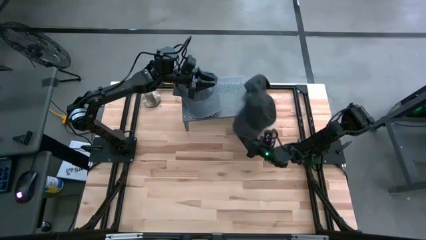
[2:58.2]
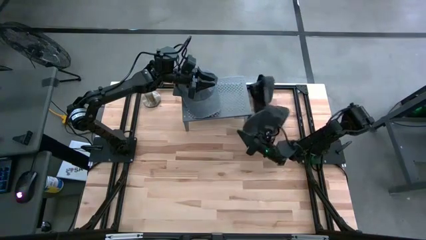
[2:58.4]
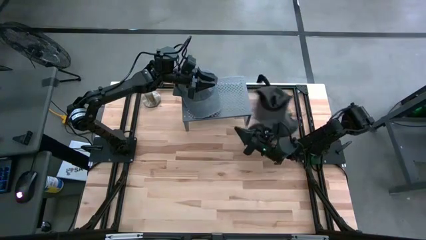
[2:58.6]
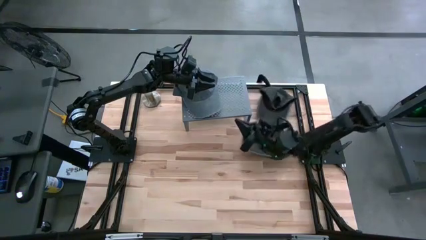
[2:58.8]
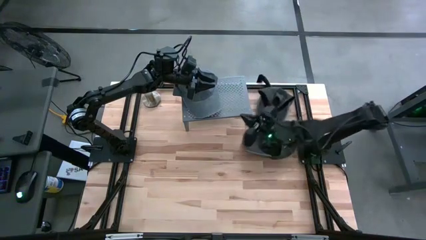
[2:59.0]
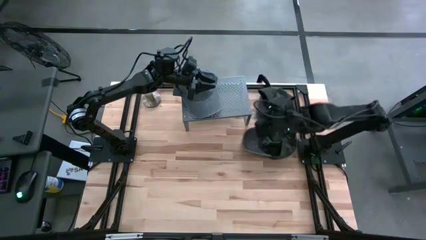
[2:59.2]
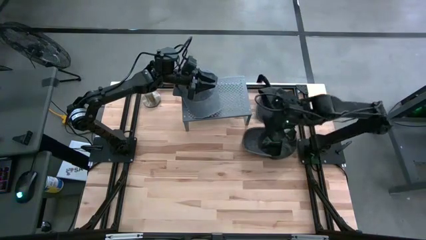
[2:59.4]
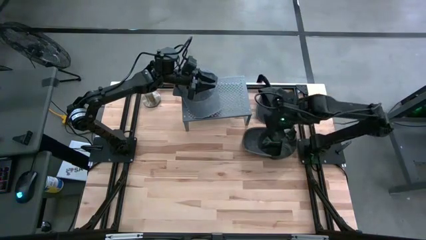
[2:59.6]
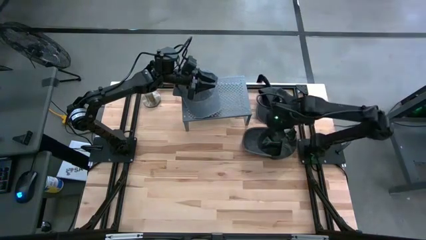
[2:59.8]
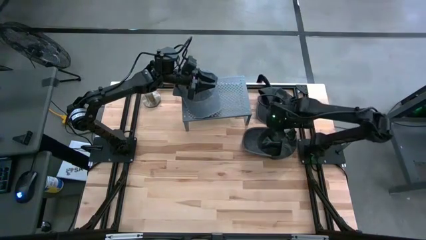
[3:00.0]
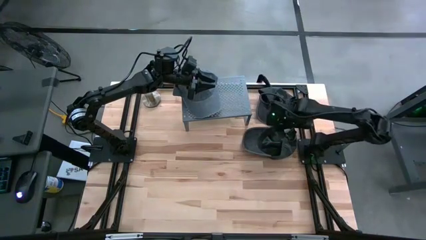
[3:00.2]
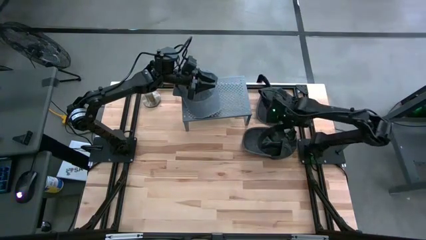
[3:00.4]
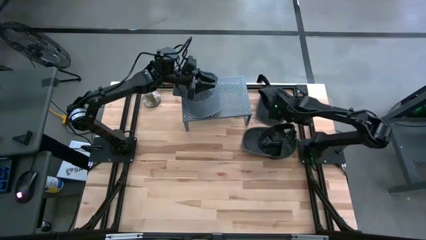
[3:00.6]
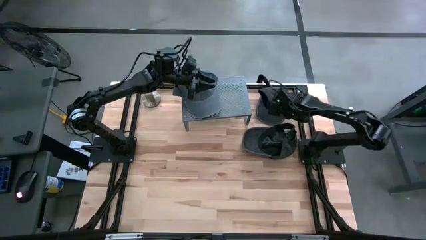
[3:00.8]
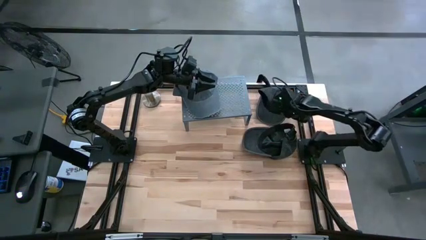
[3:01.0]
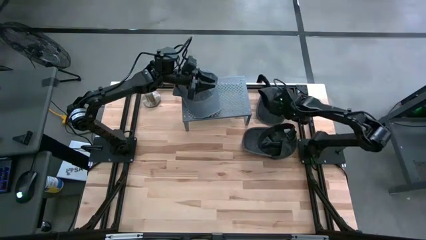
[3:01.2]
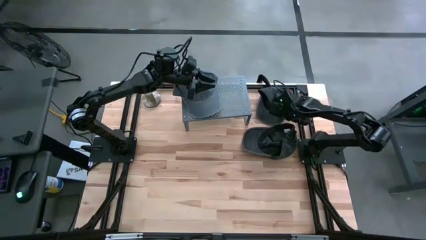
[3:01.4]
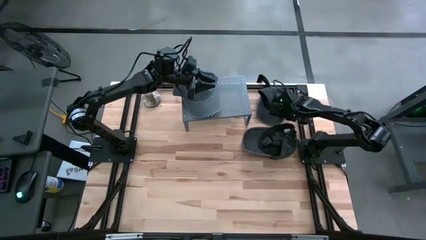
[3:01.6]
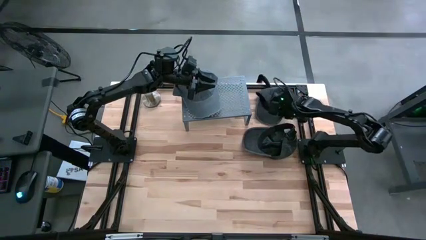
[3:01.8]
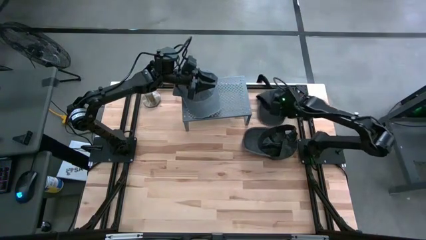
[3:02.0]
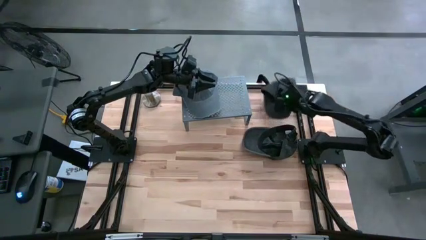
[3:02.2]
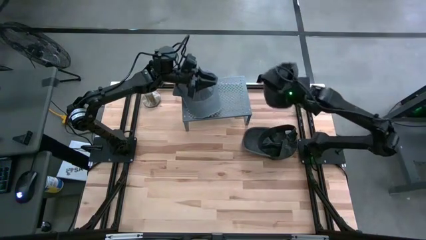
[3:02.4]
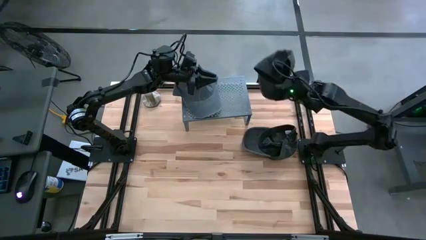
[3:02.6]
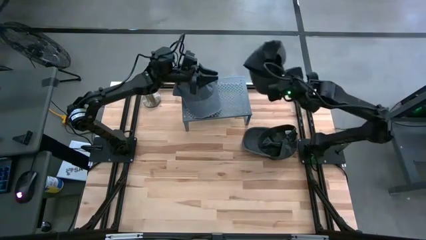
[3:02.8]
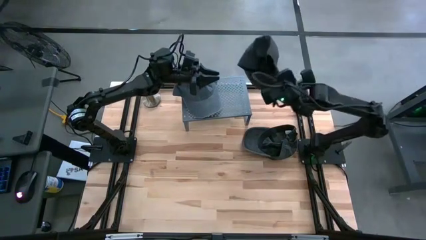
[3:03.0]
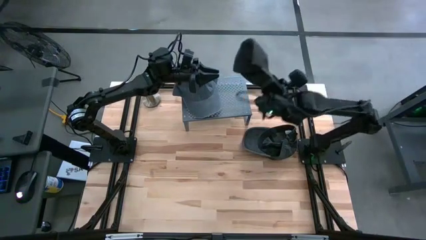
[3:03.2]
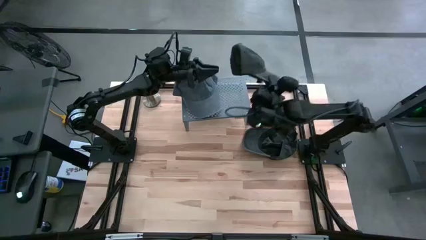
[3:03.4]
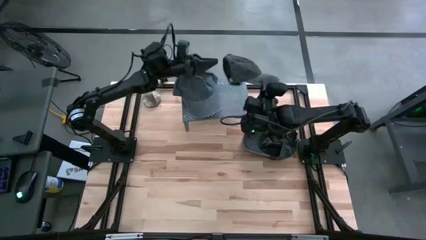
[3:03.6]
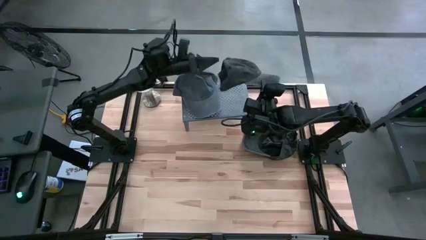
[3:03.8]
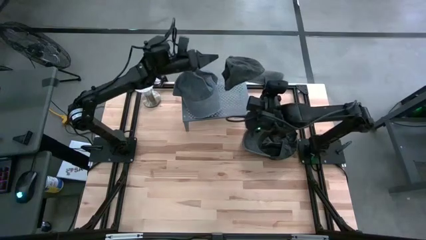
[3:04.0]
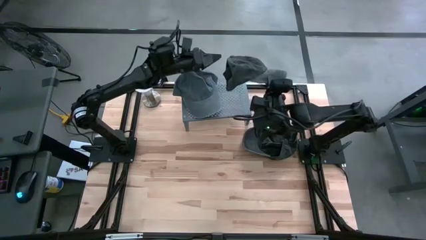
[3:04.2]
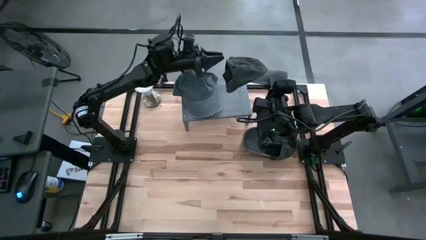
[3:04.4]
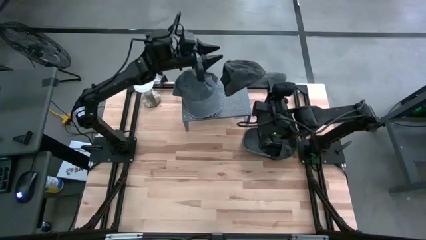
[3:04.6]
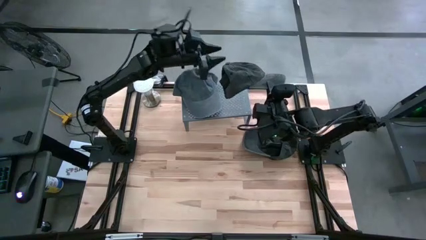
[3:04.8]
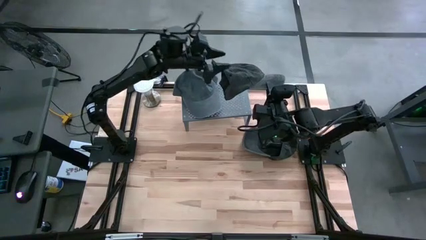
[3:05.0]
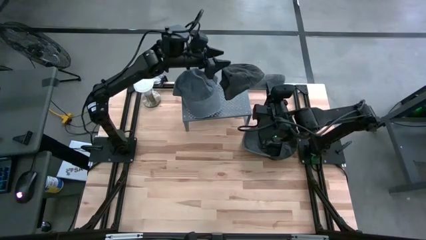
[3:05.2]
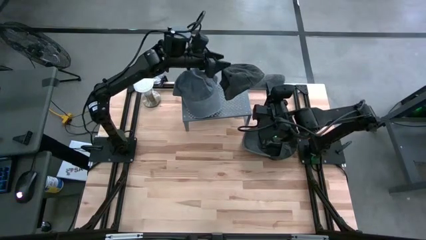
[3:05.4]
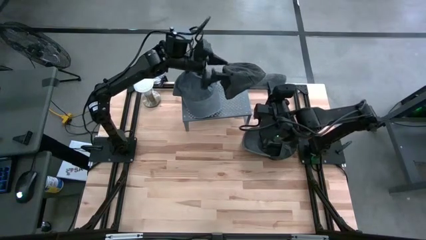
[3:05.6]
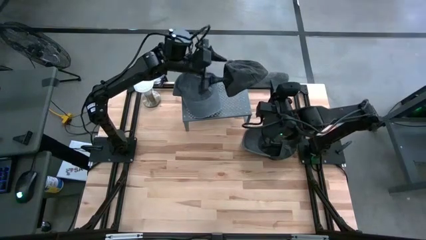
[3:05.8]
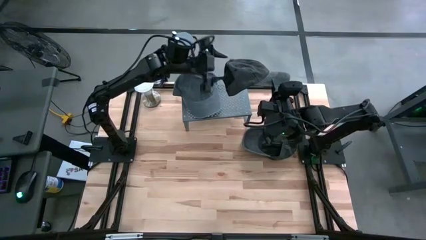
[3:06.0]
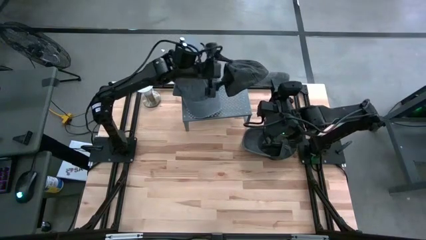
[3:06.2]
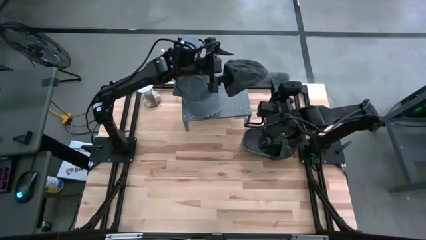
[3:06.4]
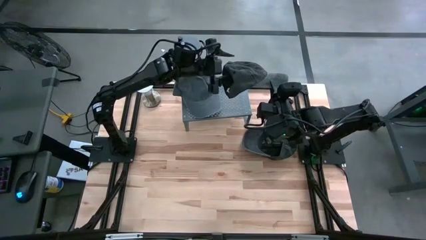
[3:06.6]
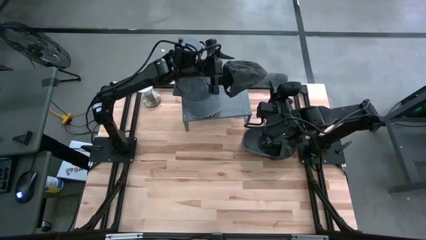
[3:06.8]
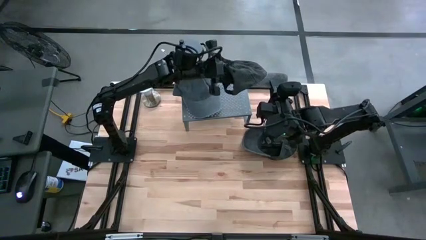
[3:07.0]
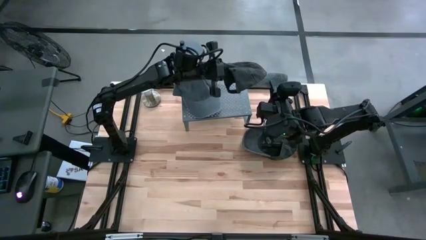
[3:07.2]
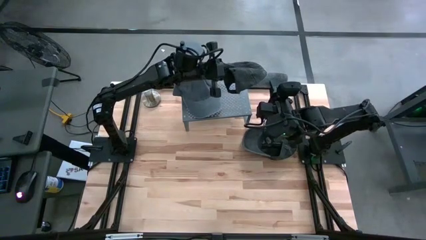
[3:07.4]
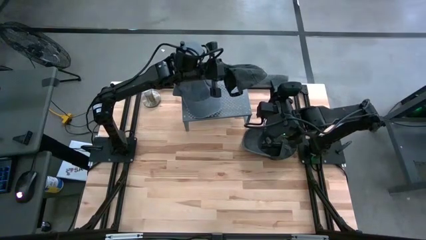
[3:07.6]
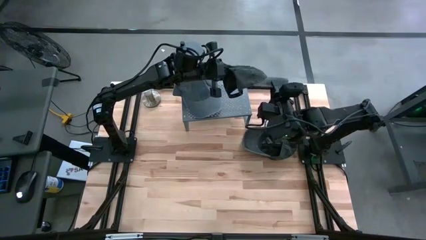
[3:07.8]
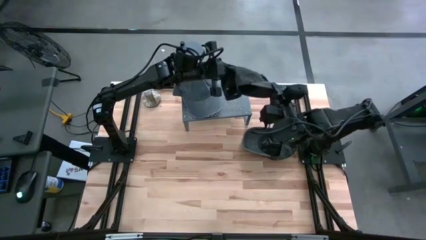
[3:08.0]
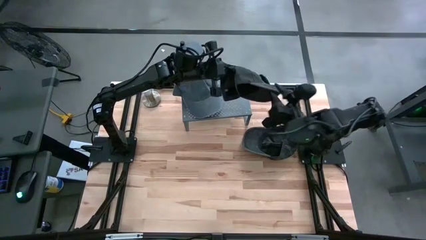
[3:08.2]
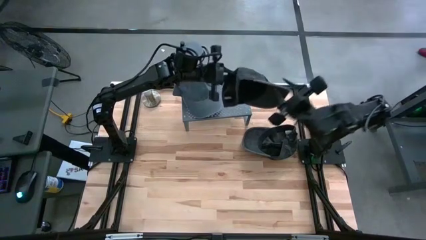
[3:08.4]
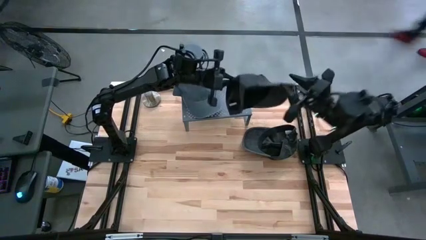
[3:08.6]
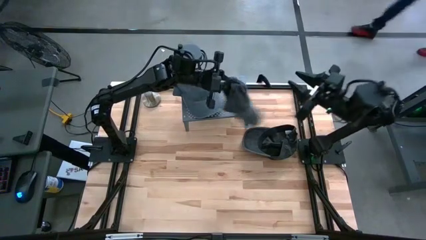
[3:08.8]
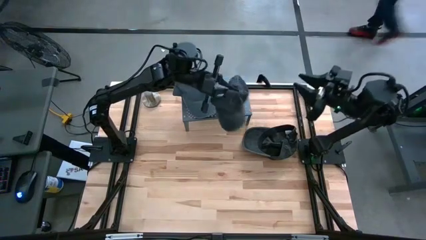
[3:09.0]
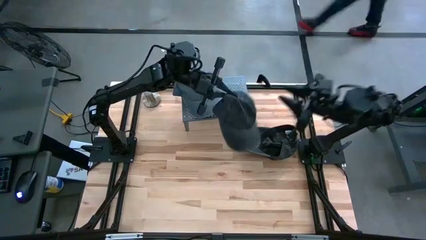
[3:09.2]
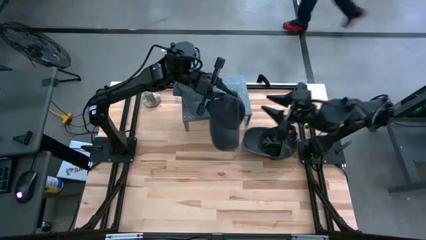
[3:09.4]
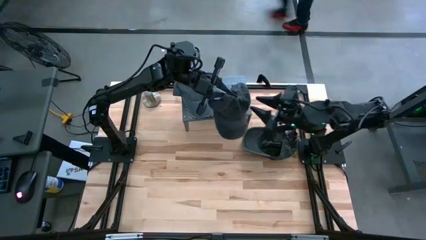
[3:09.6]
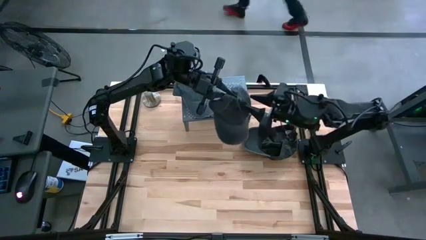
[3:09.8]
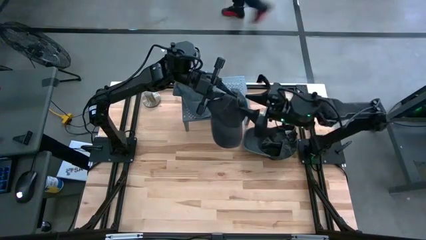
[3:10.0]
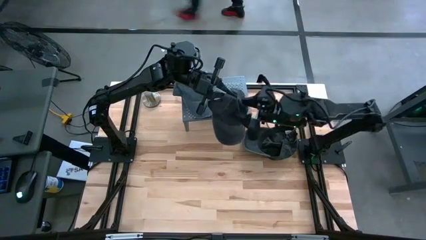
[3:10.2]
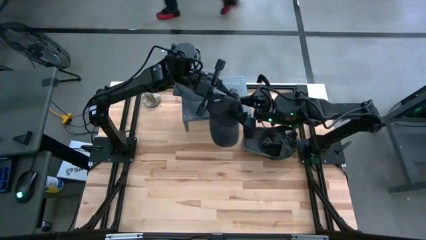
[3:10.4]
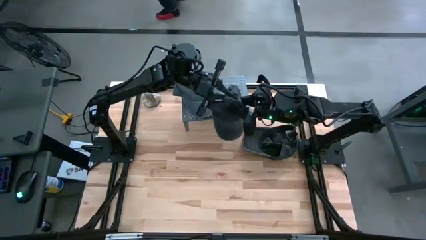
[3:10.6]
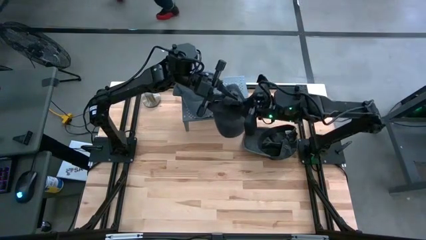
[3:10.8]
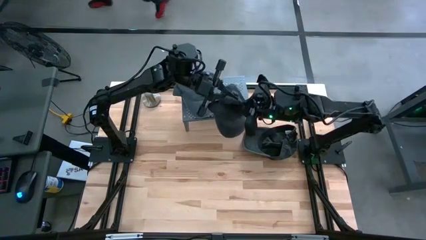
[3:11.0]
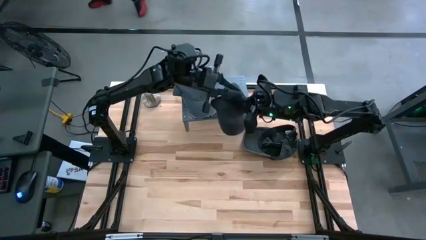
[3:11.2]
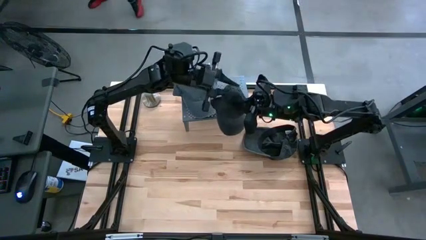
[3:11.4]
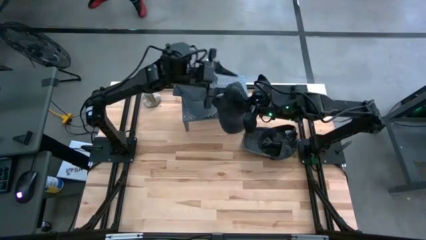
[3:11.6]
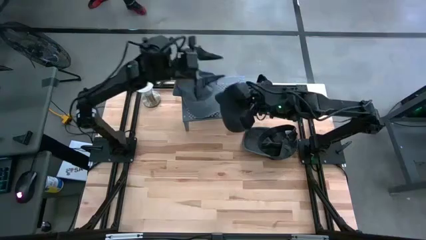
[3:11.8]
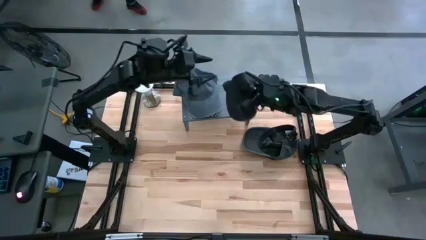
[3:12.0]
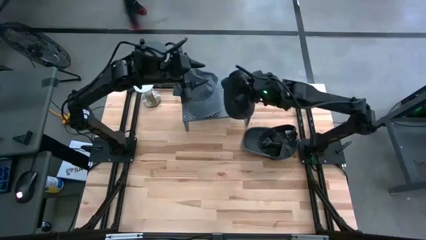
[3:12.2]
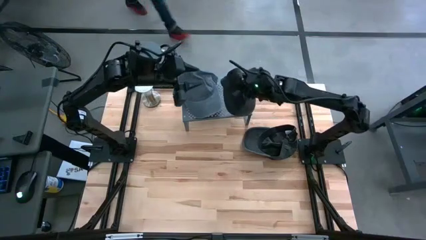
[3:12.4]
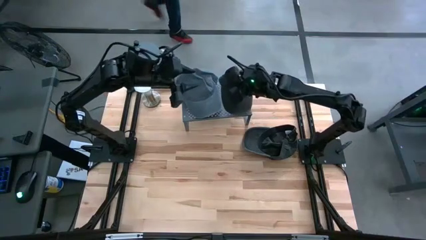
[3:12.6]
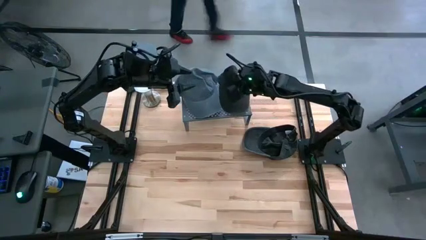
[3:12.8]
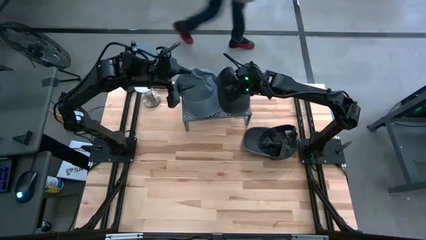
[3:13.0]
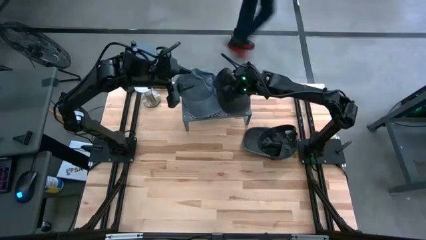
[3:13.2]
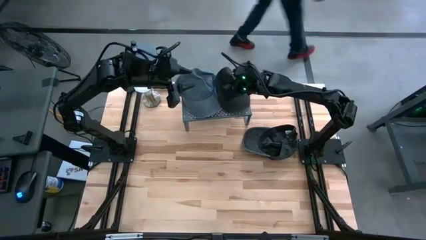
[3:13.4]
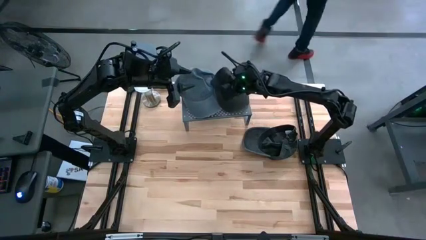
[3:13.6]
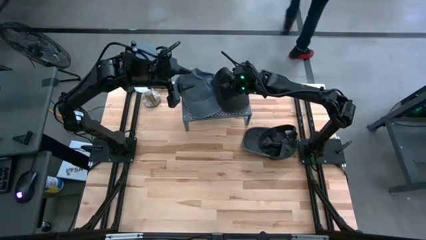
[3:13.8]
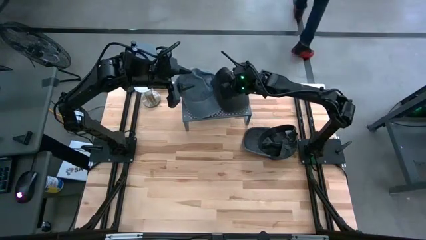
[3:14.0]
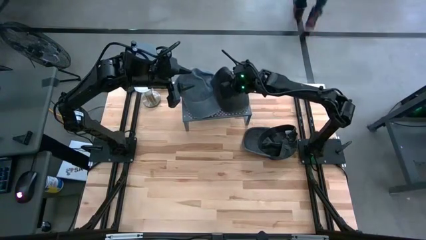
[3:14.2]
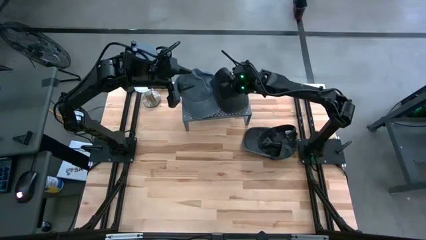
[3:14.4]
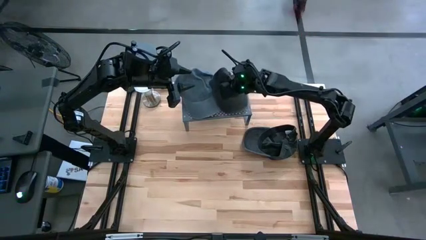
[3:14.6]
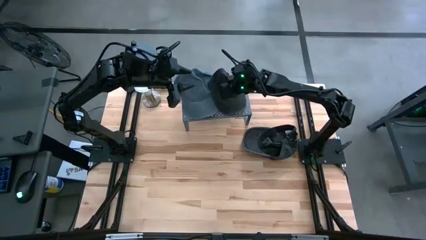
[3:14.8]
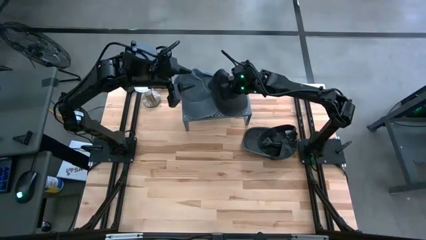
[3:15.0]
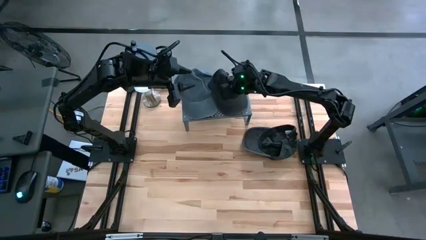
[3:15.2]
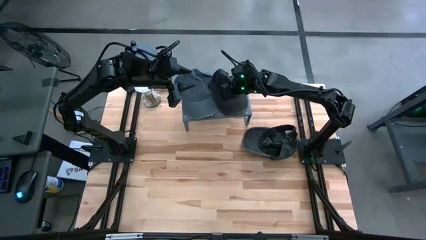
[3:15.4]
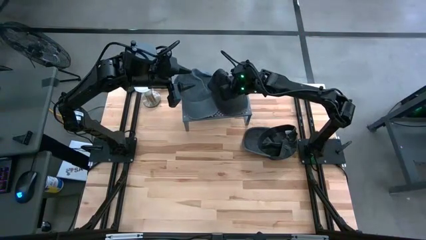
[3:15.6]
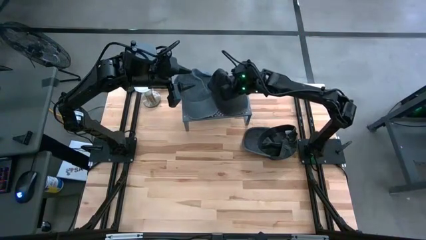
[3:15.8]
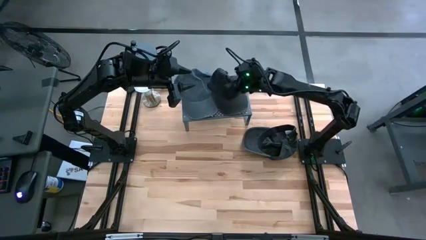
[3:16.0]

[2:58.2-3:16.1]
Task: Pick & Place hat
Put the top black cap on the shelf
